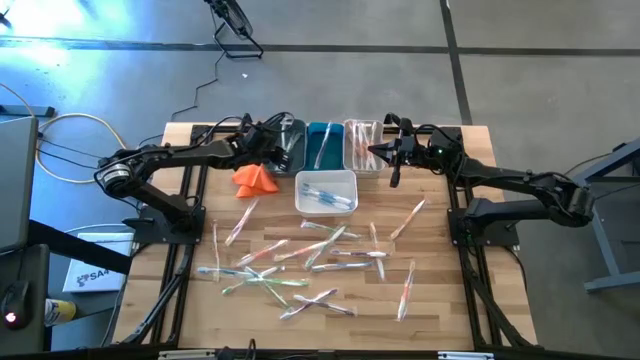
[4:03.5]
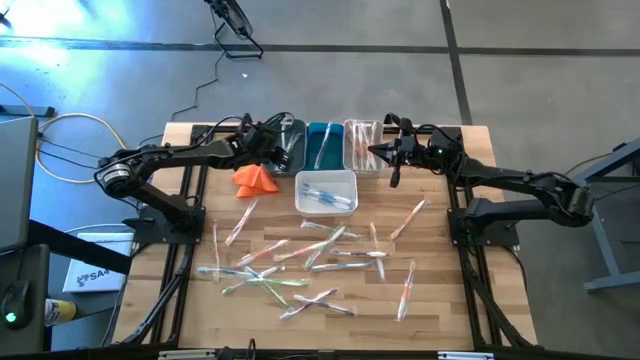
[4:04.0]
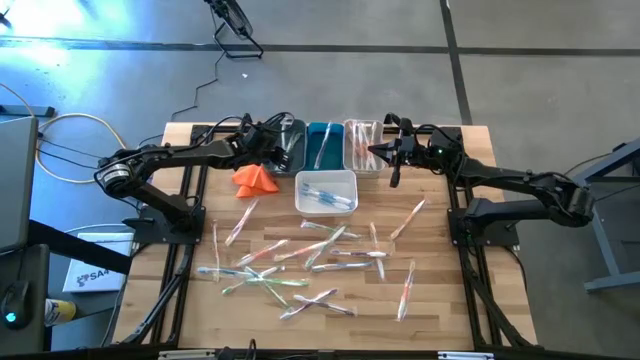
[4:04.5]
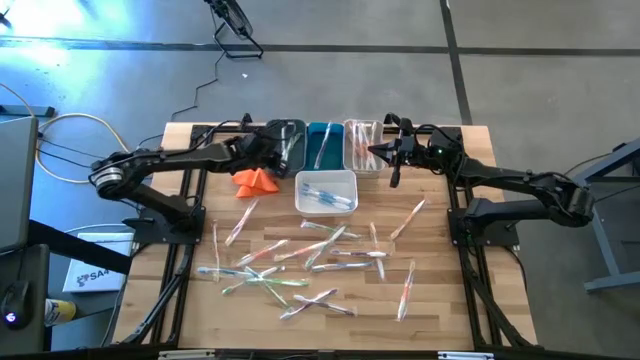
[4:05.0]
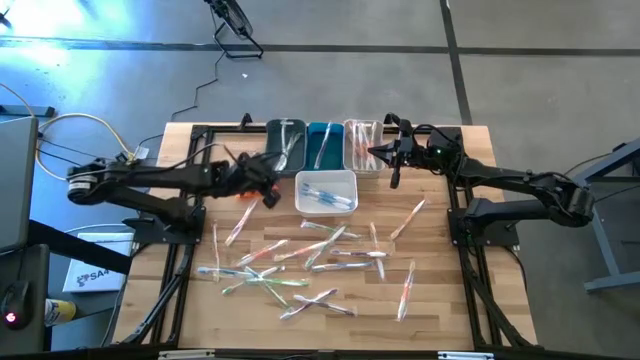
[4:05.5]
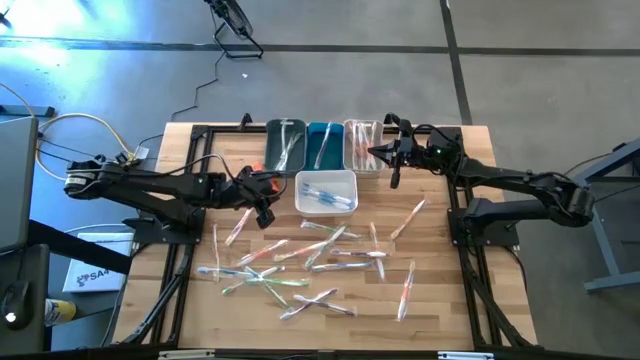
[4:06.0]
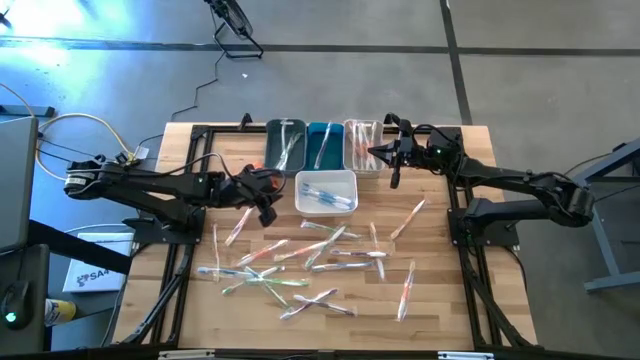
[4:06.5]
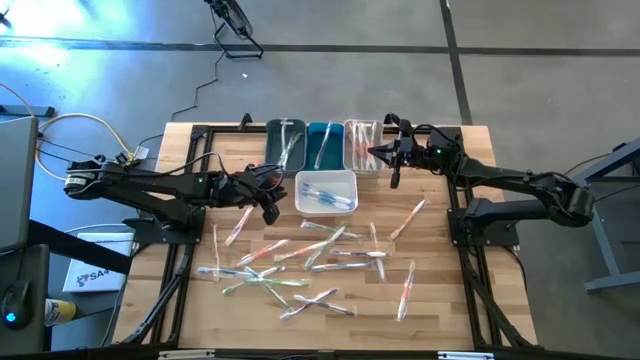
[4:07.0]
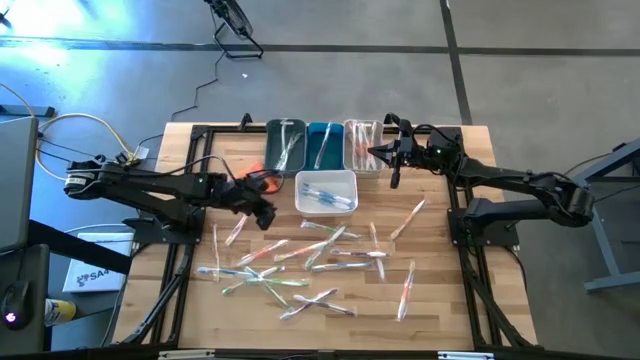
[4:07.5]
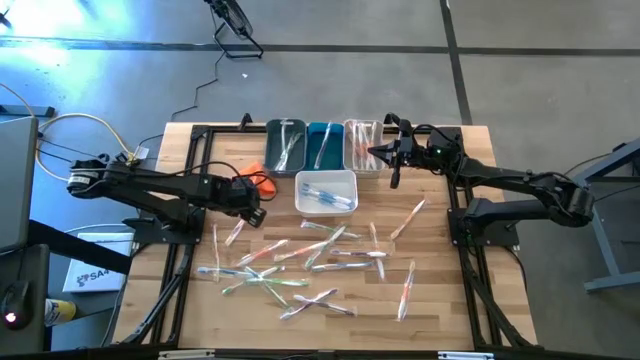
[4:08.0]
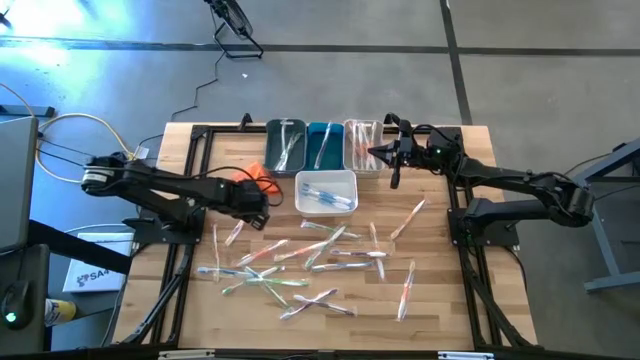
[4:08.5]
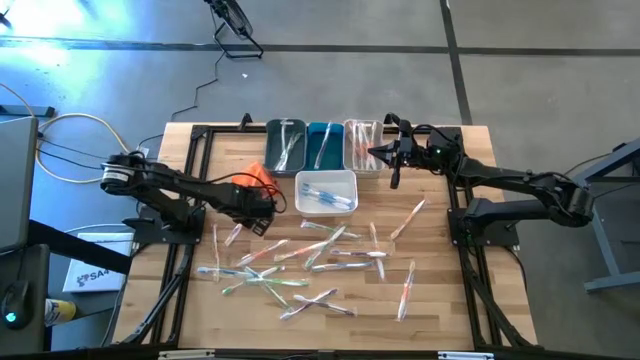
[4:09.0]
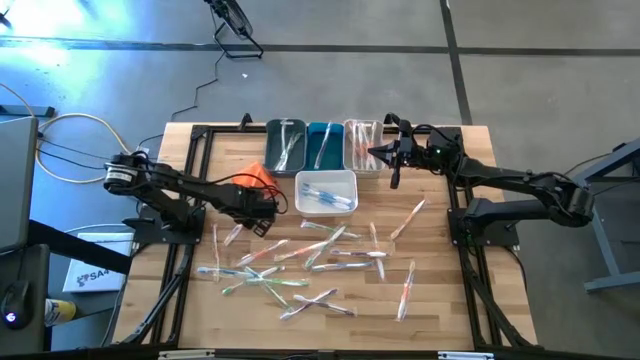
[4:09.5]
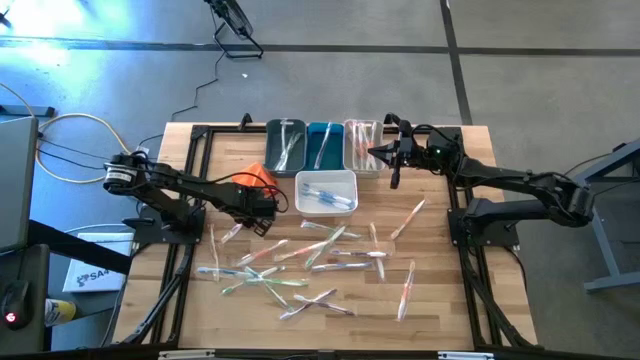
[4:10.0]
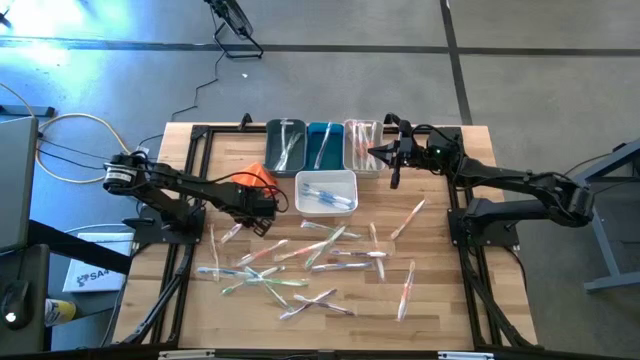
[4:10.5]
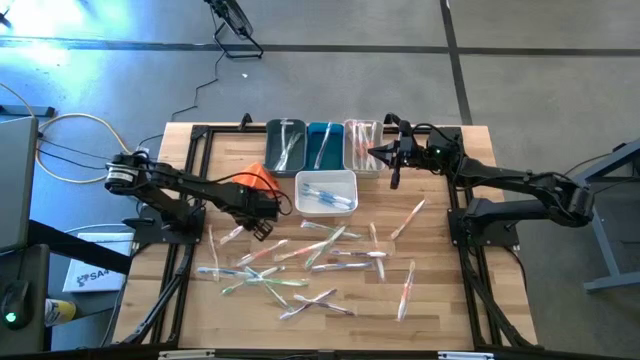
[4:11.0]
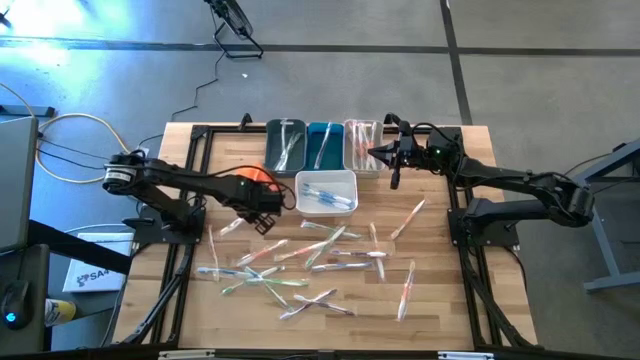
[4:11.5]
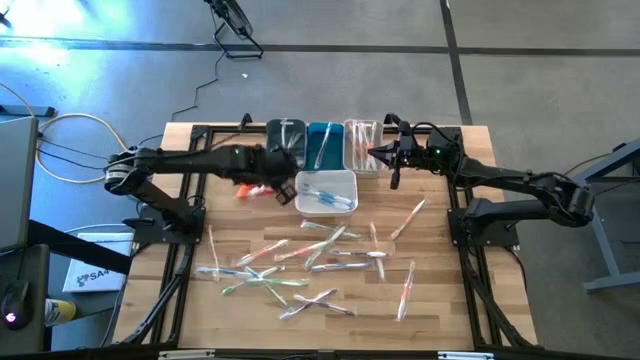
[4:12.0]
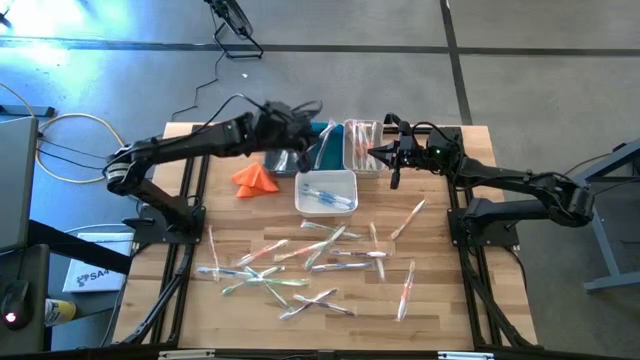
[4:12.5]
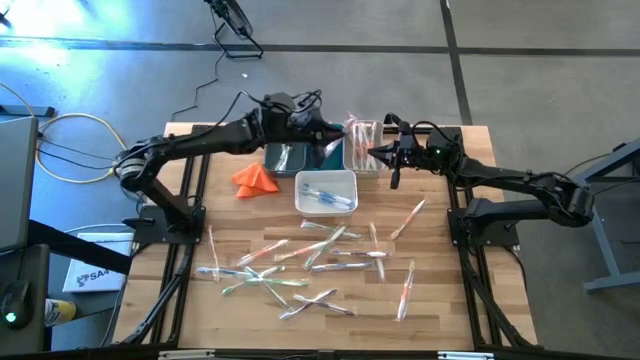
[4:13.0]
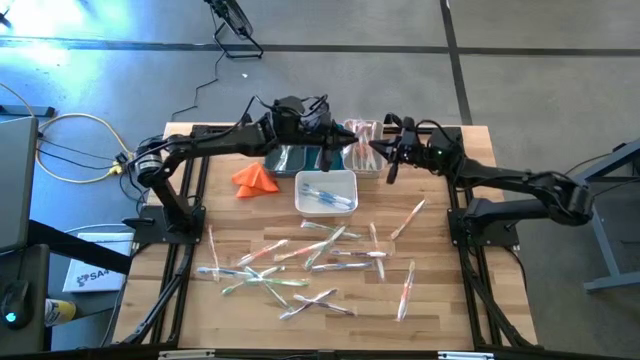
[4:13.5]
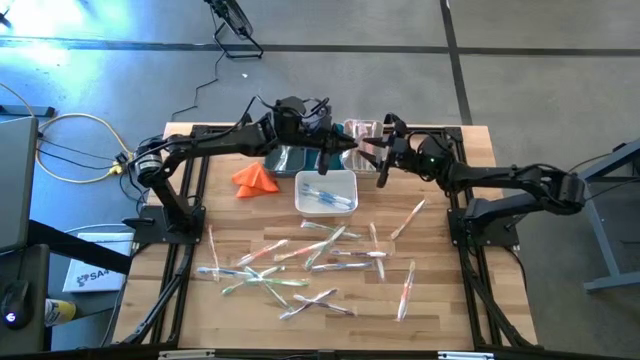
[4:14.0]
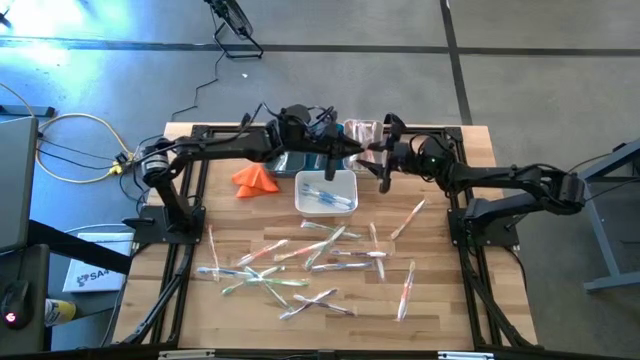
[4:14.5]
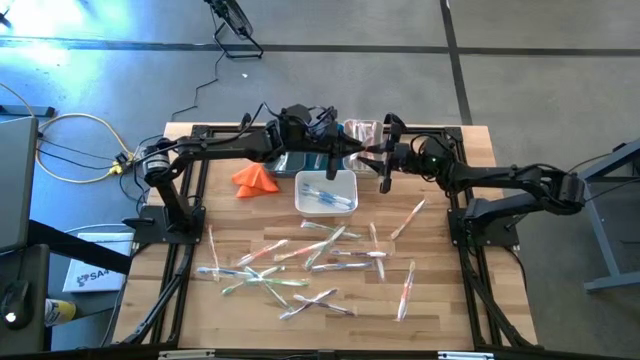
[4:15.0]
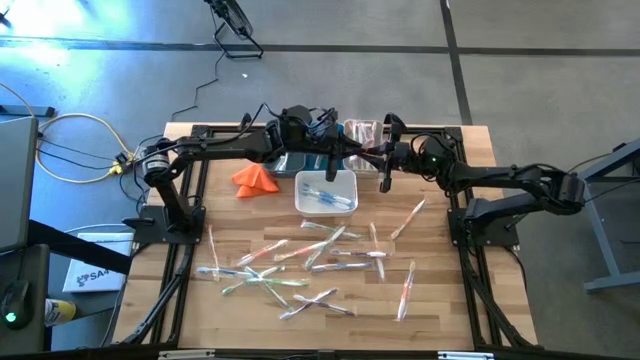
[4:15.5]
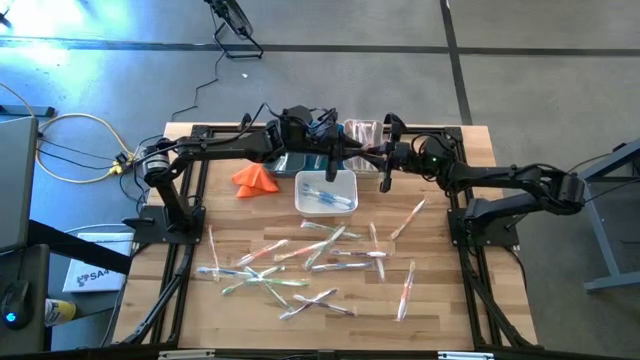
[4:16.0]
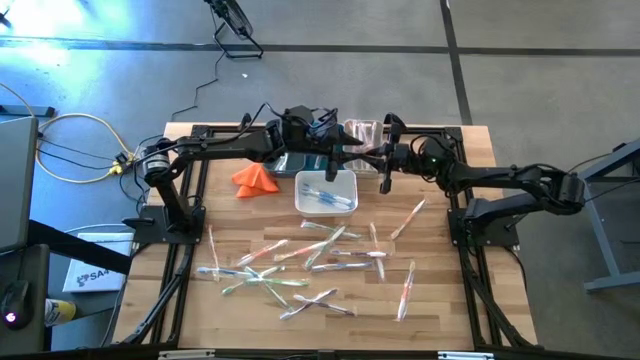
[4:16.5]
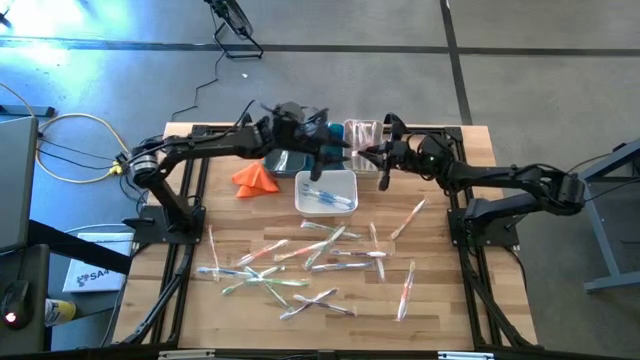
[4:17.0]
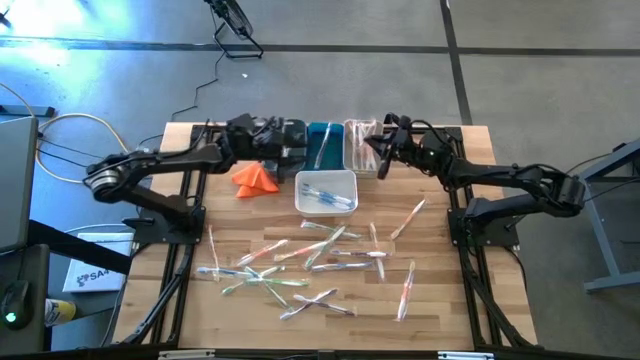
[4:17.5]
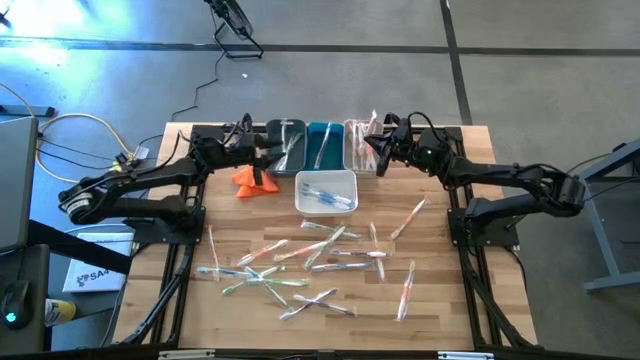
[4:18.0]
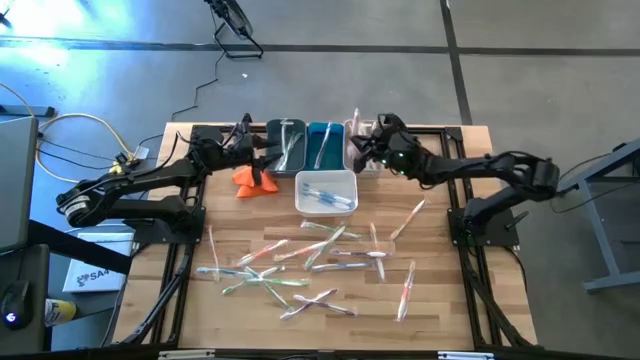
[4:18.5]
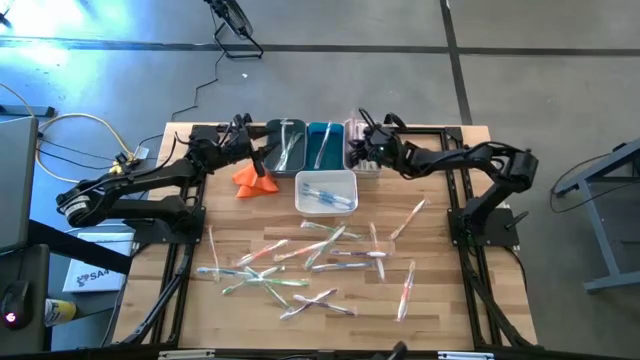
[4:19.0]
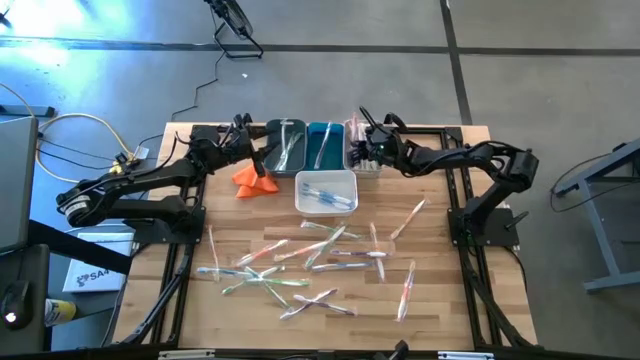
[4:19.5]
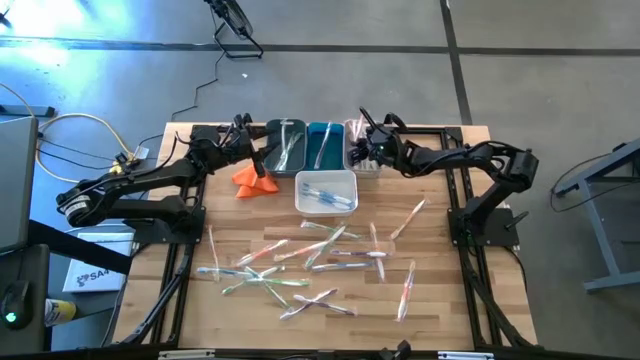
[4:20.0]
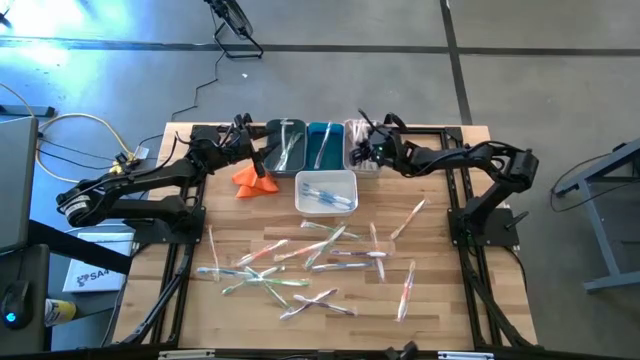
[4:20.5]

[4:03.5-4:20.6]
Task: Pick & Place Toothbrushes
Put the orange toothbrush into the gray bin

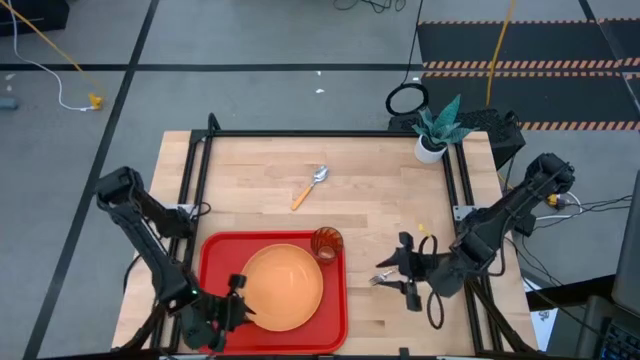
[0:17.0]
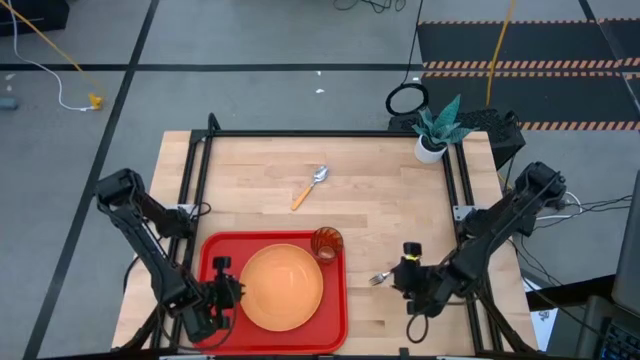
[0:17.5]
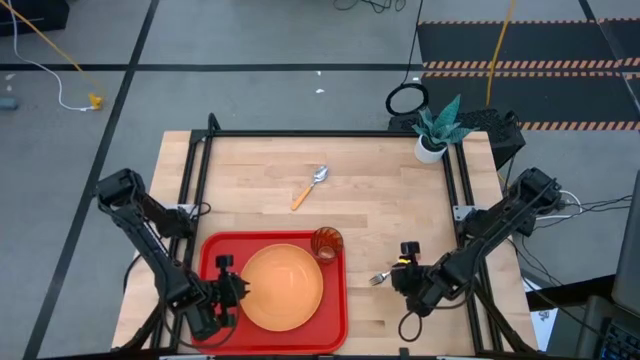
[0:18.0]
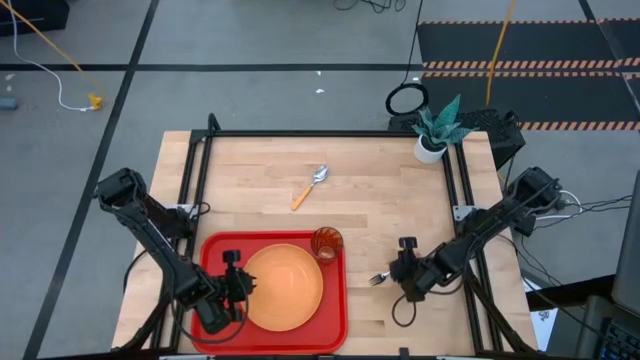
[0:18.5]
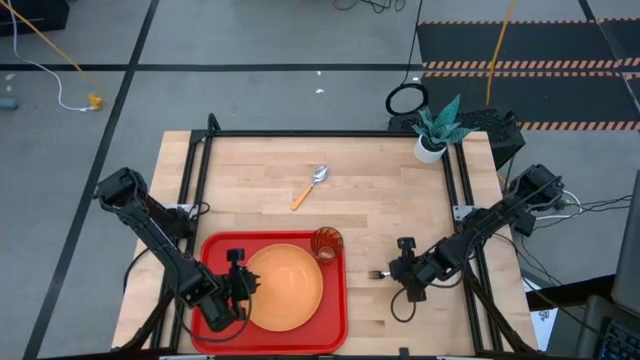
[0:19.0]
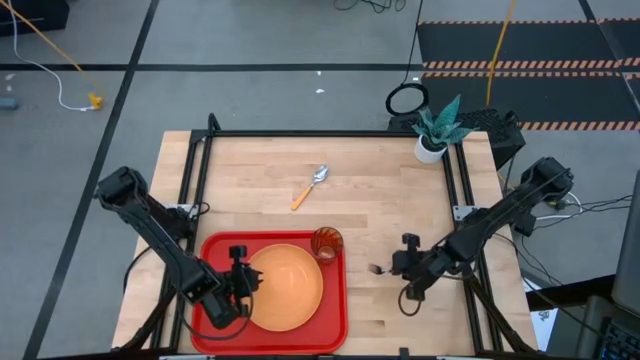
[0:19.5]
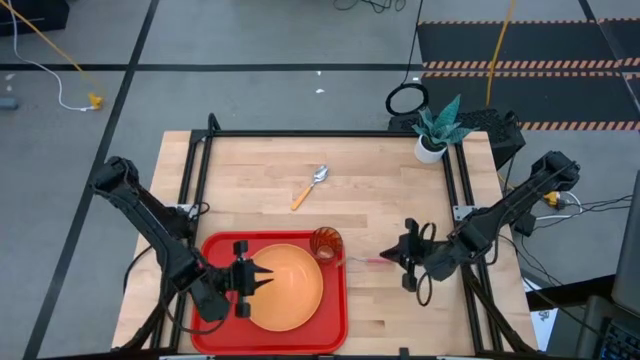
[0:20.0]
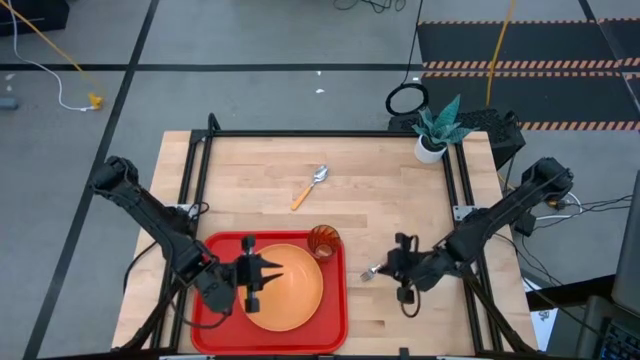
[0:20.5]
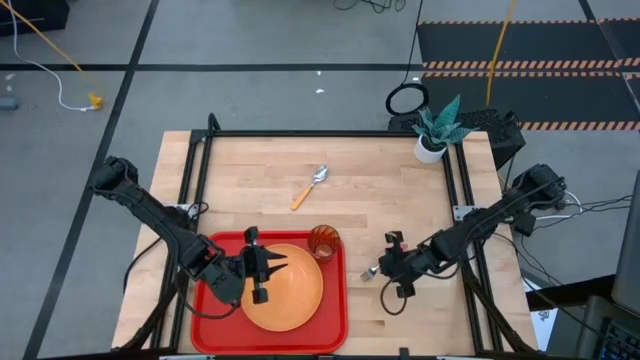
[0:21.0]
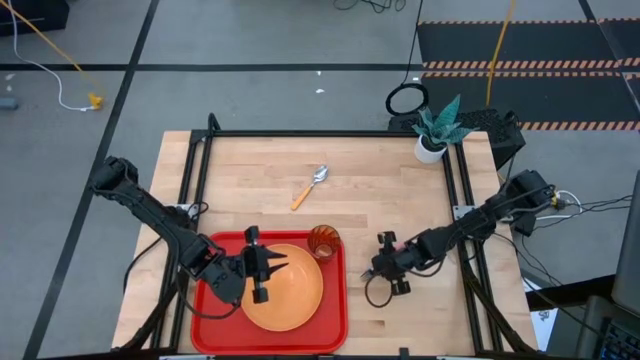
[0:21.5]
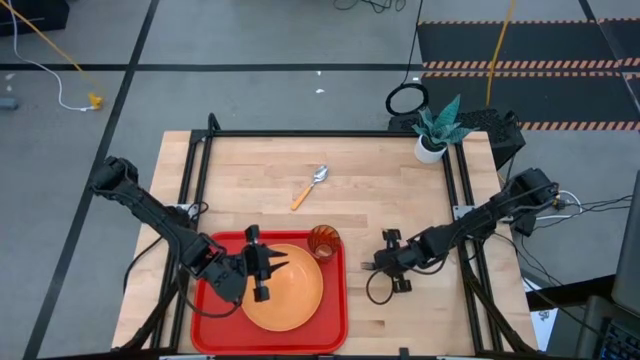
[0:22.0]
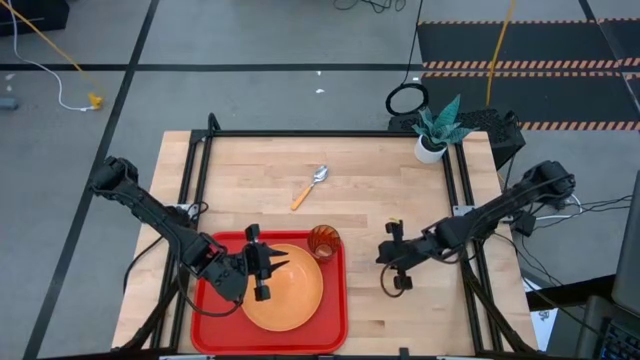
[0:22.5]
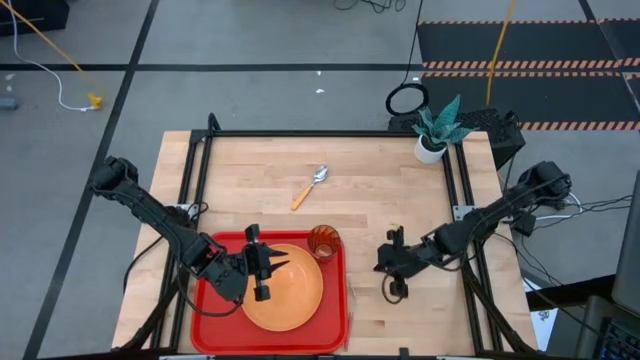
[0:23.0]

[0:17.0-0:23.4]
Task: Pick and place plate/cup/fork/spoon on tray
Put the pink fork on the red serving tray to the left of the orange plate
